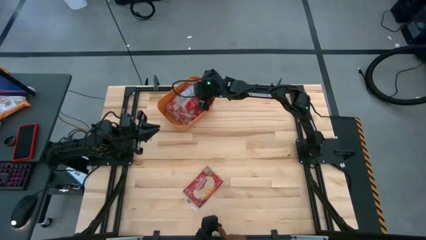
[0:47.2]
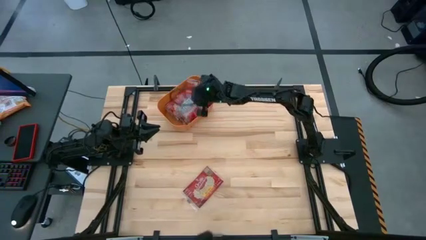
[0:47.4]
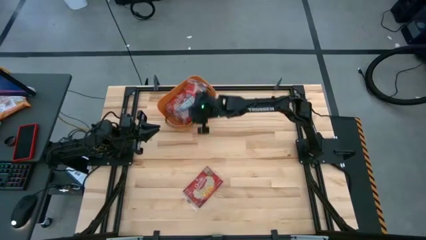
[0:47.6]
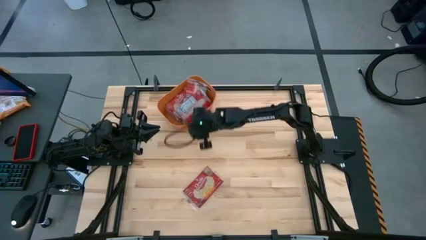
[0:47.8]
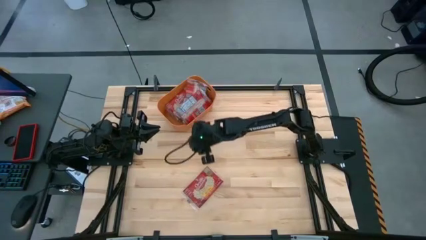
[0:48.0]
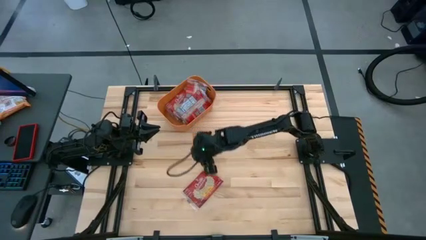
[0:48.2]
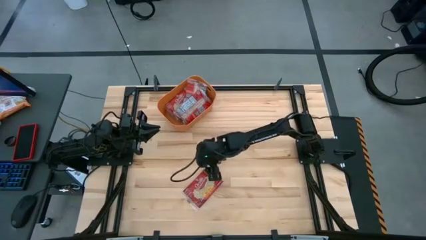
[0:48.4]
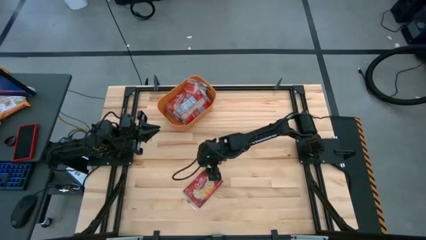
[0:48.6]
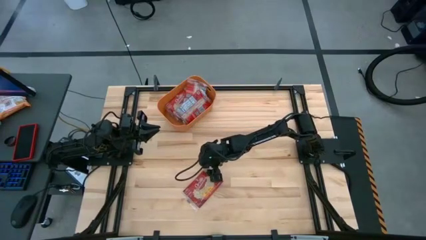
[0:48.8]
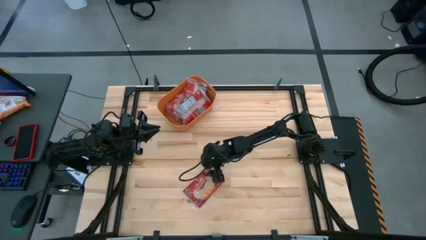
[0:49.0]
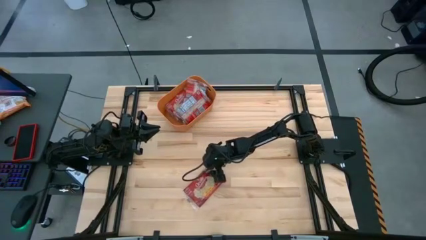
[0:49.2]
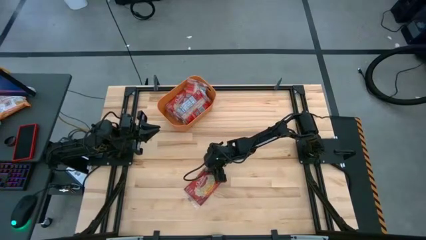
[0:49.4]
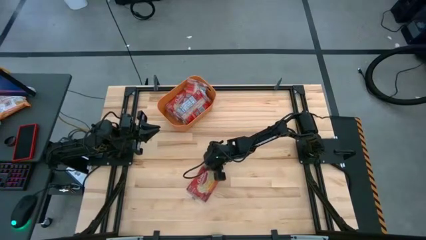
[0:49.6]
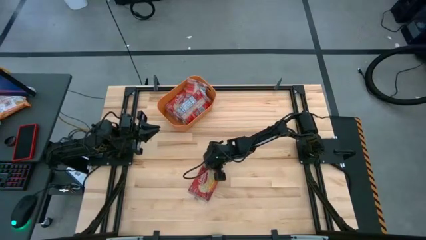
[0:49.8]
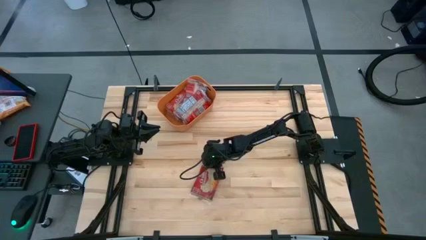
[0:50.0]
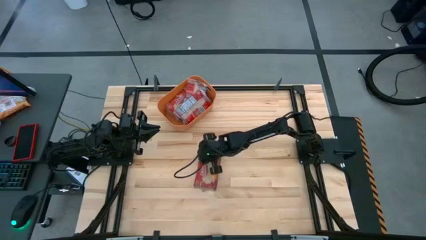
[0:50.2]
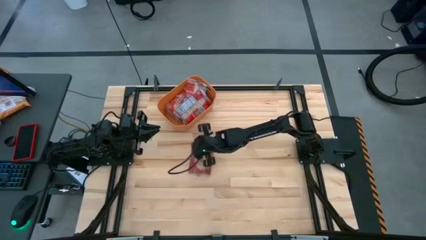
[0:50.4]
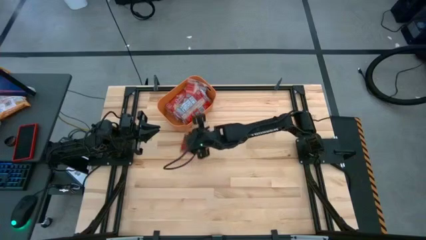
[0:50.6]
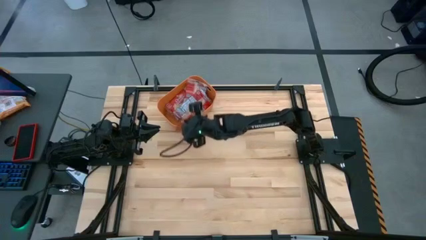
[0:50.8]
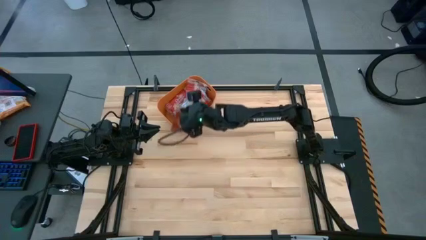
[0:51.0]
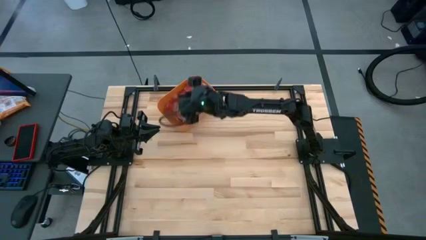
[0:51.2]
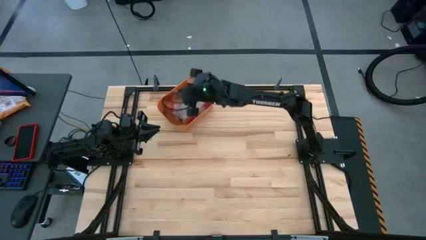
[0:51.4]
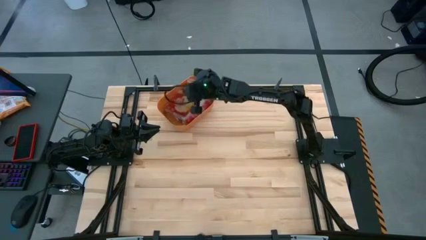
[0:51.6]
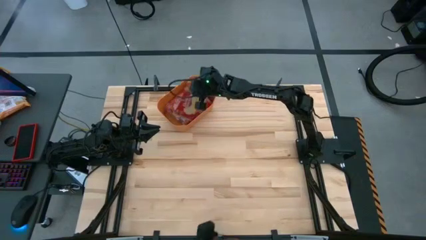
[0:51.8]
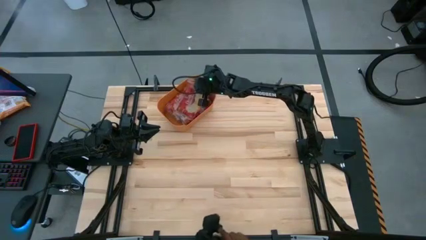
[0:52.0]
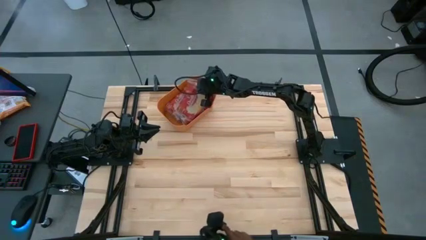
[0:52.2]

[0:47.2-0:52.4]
Task: Sort popcorn bags into baskets
Put the red popcorn bag into the orange bin

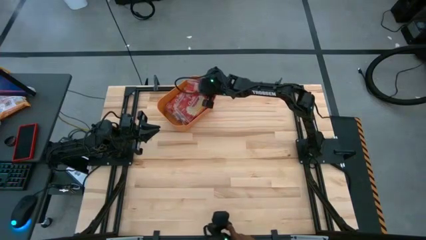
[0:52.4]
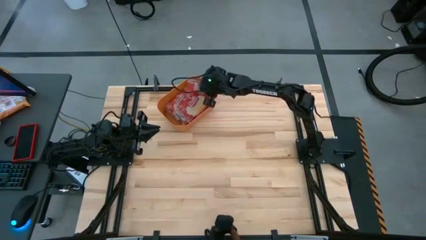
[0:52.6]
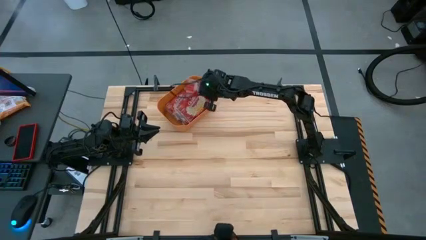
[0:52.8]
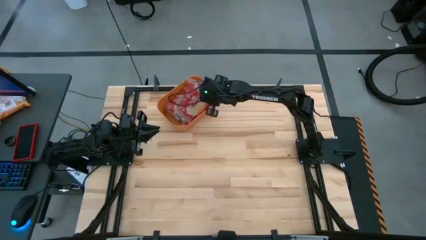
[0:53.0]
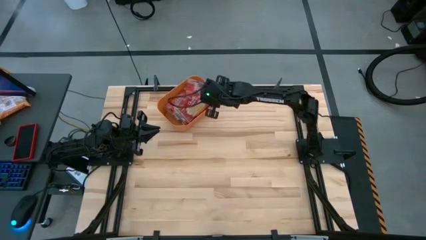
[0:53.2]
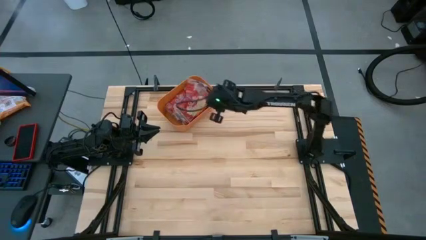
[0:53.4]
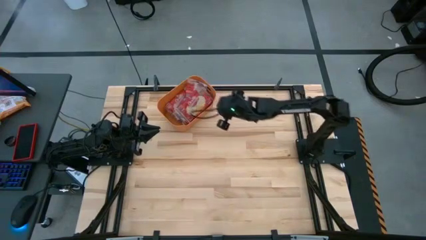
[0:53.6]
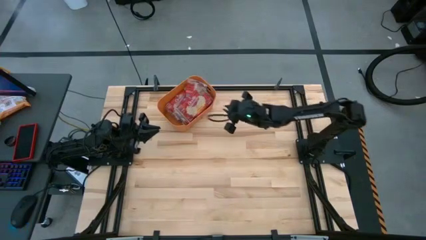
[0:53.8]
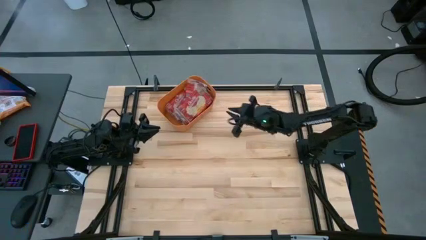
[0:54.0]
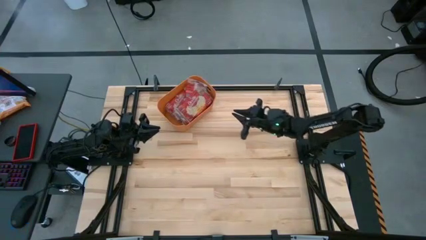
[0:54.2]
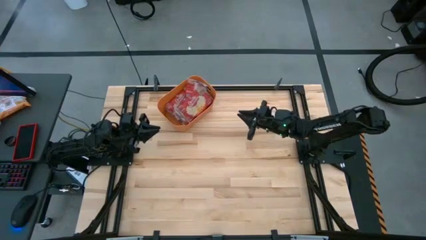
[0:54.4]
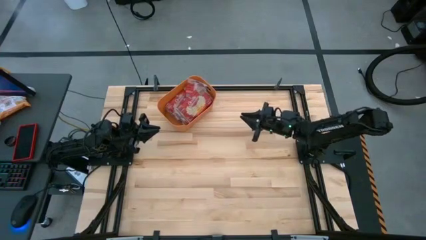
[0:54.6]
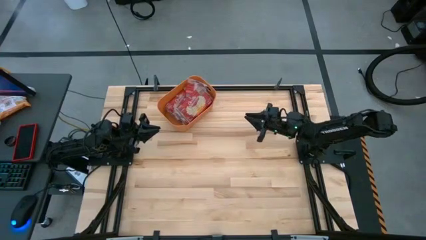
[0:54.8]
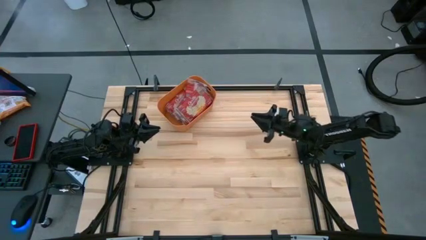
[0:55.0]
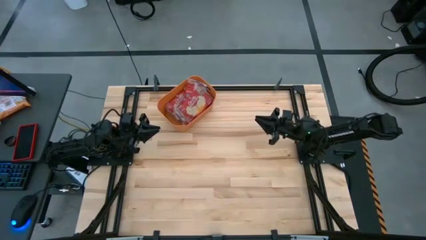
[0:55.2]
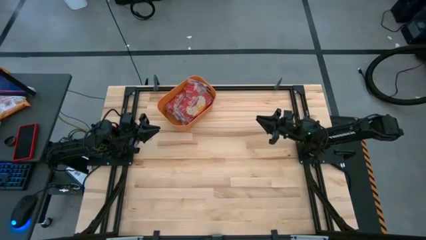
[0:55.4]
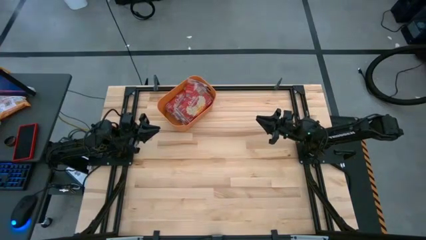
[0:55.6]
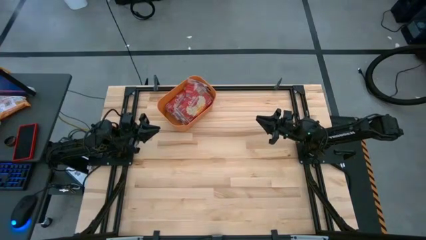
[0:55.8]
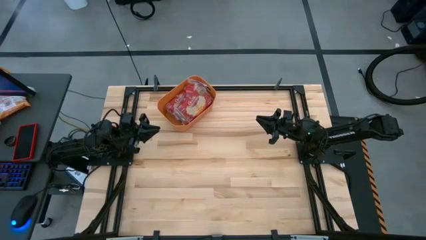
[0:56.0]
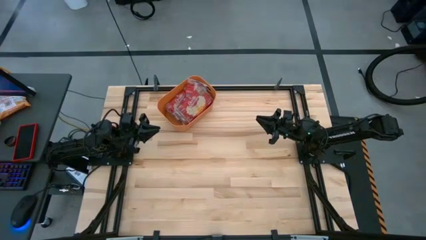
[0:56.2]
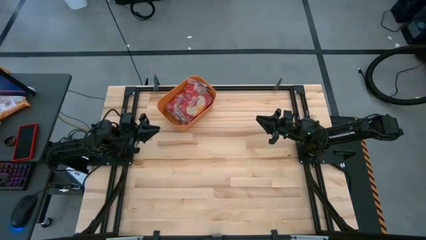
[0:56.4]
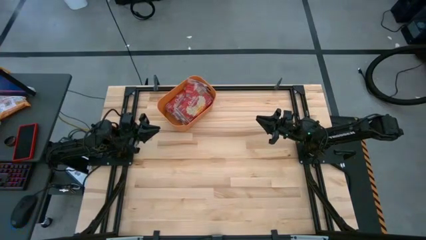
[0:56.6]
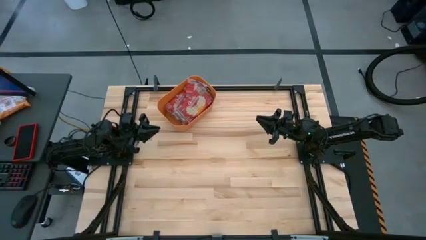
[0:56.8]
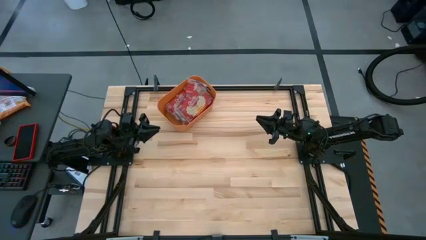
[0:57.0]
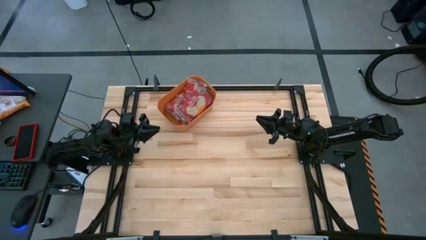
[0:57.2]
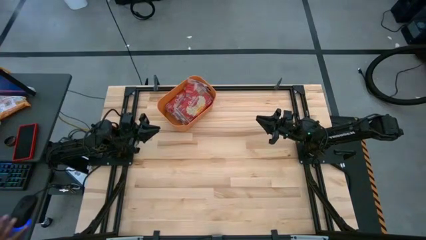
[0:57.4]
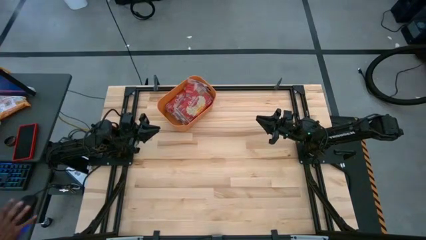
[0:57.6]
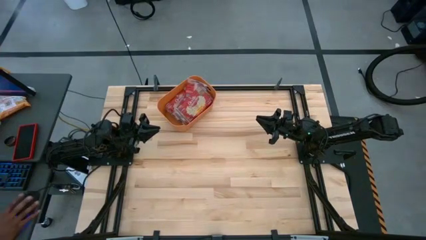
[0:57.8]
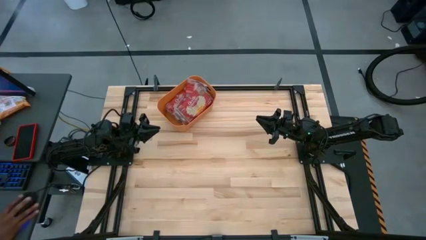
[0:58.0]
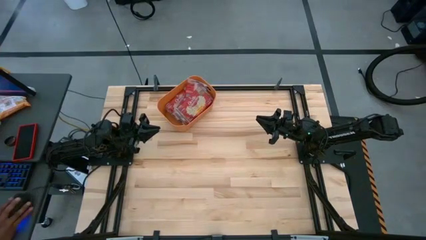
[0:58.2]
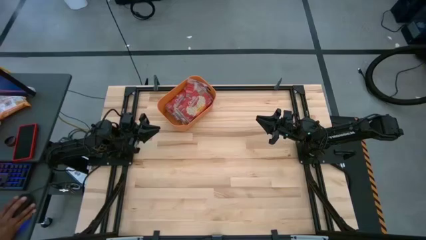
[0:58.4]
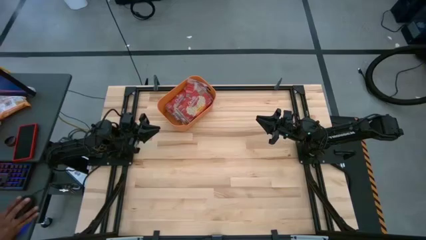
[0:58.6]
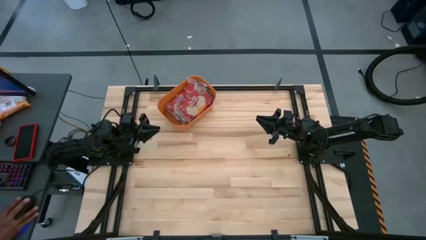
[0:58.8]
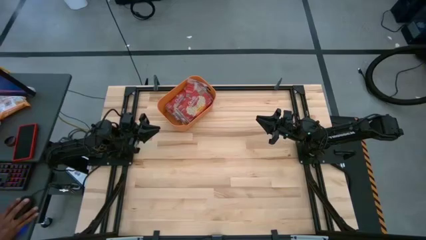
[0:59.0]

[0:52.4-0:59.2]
Return to Home Position

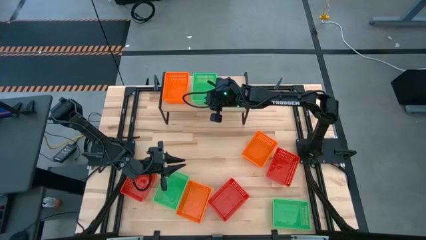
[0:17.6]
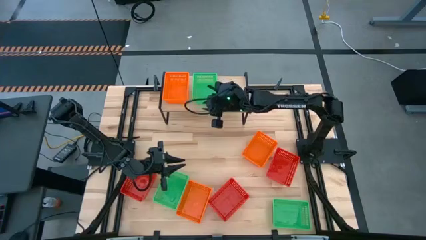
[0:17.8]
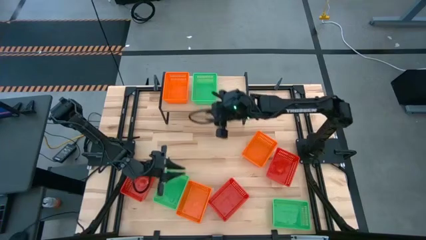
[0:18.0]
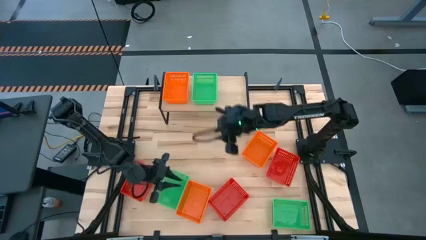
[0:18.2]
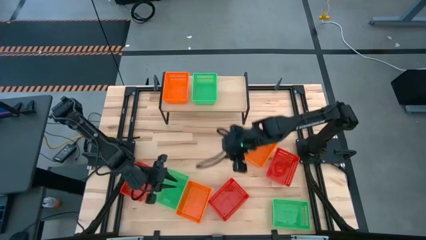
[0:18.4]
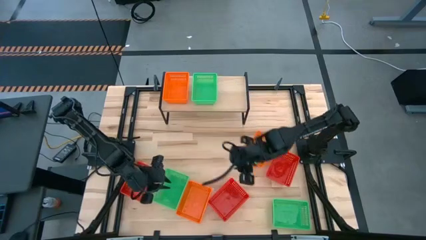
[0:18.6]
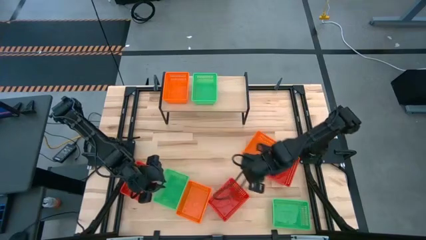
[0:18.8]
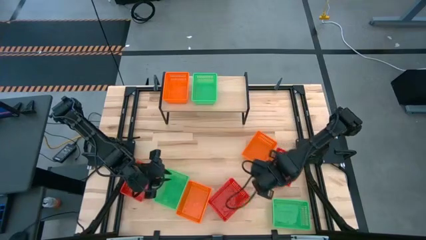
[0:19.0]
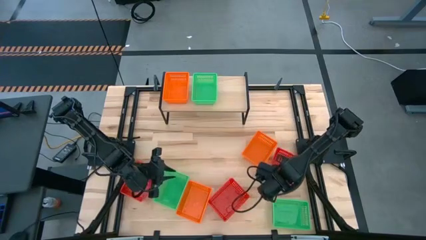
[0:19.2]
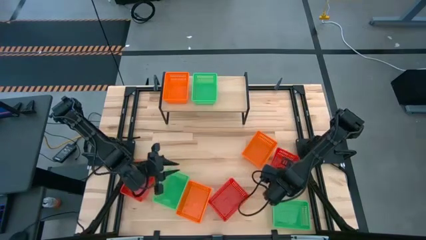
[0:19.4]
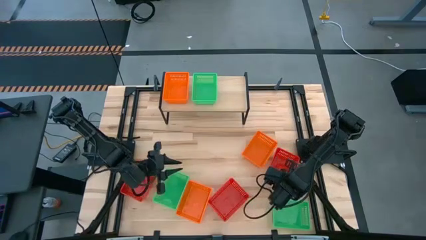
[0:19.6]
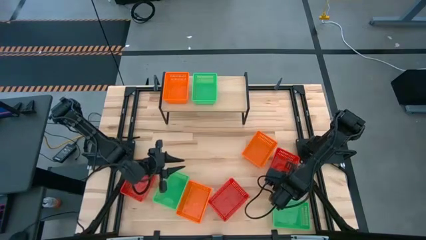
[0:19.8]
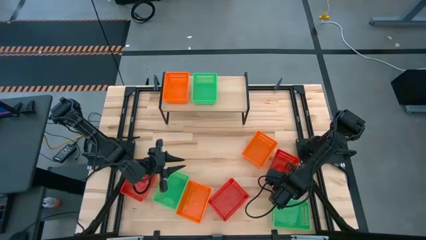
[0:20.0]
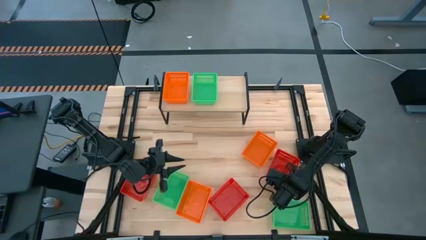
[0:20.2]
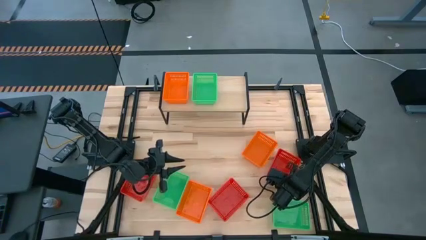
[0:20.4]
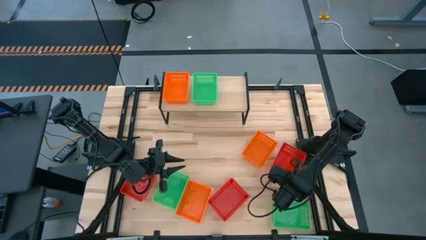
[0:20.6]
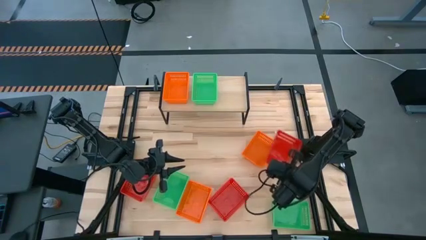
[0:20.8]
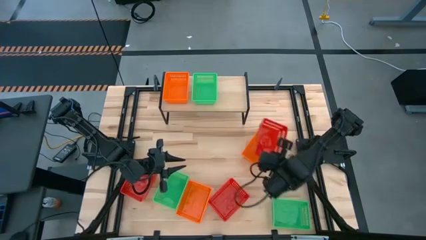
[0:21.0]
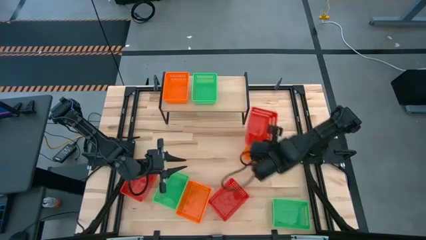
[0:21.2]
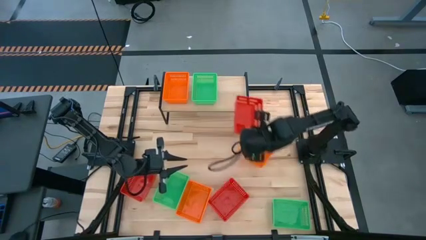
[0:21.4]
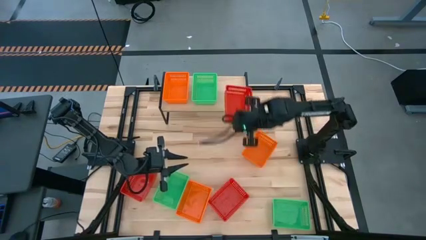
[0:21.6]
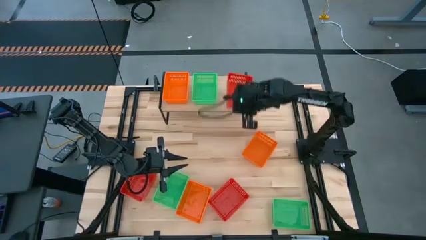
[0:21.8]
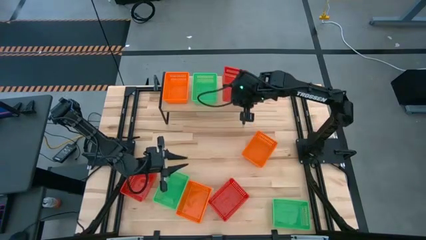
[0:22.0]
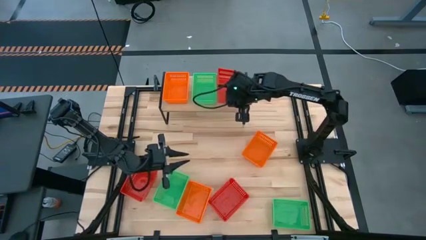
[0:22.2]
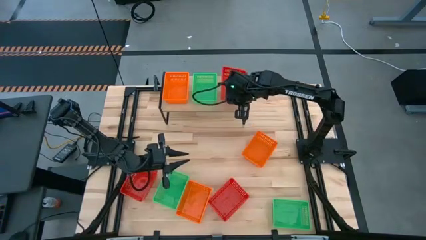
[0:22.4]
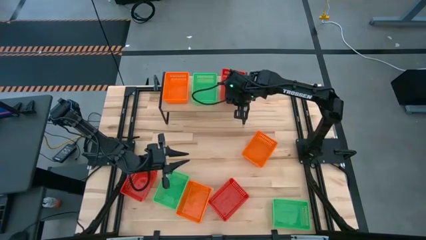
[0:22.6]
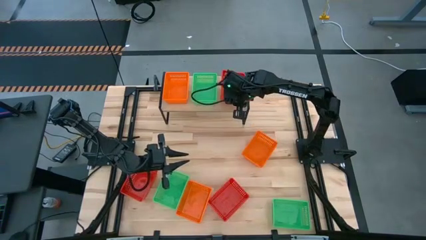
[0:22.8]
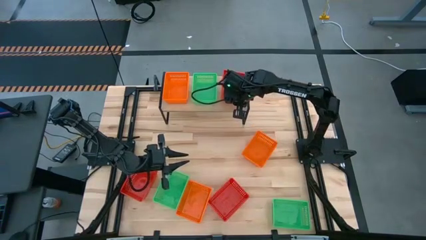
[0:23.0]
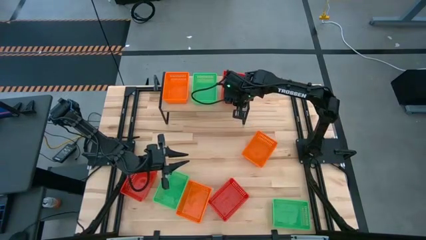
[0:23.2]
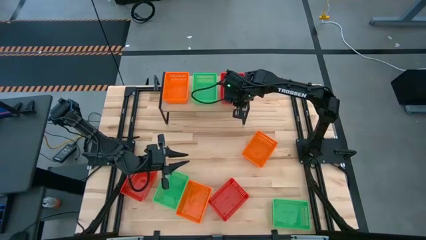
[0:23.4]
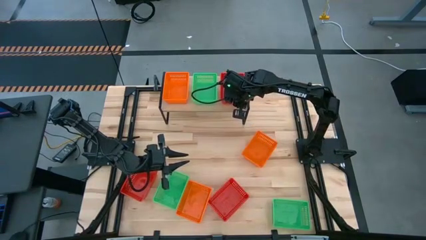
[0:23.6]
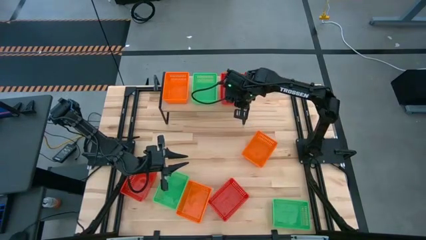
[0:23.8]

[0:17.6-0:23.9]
Task: Stack baskets on shelf by color
Put the right red bin on the shelf
